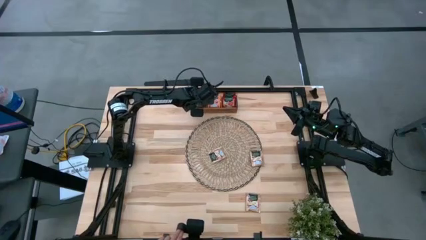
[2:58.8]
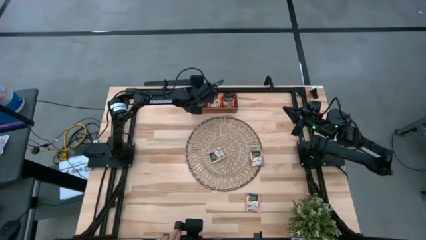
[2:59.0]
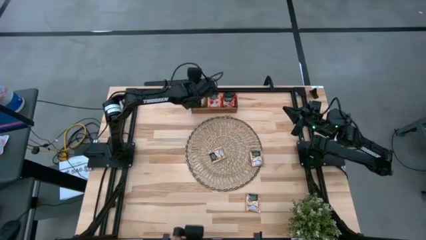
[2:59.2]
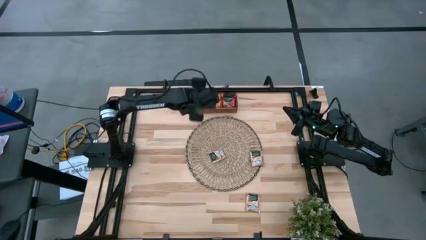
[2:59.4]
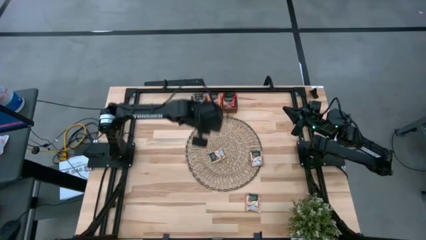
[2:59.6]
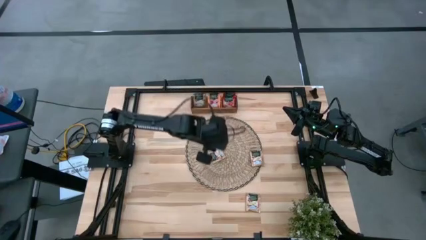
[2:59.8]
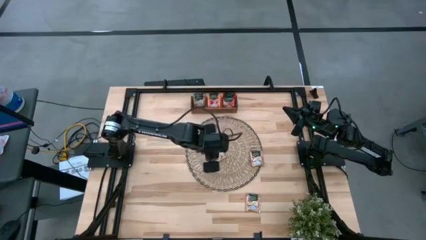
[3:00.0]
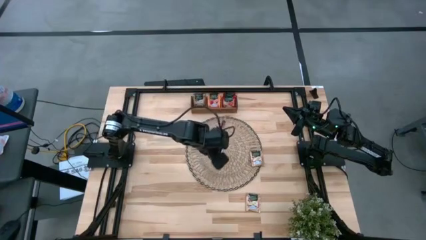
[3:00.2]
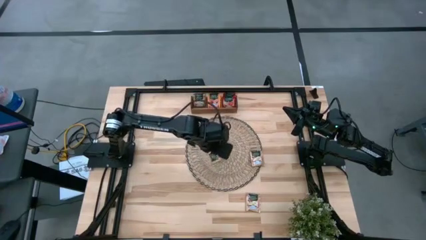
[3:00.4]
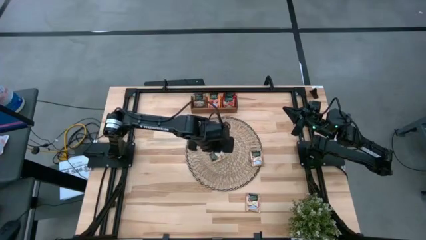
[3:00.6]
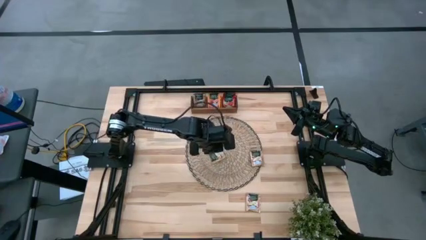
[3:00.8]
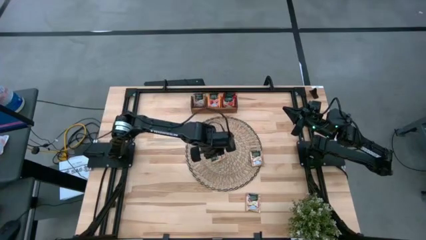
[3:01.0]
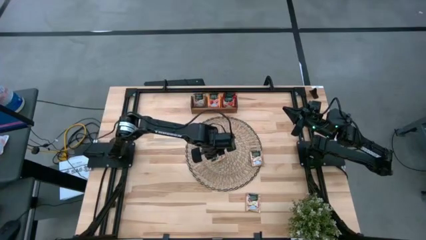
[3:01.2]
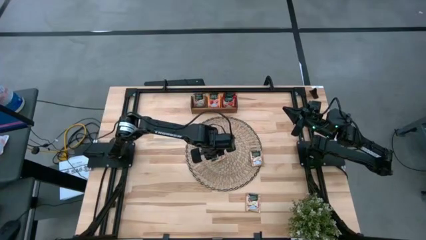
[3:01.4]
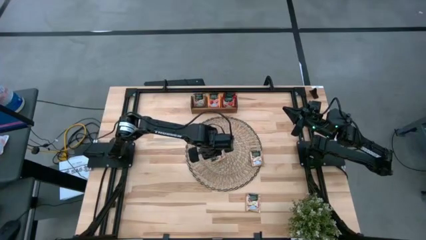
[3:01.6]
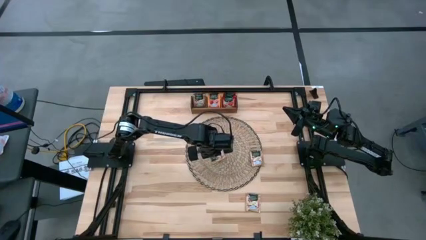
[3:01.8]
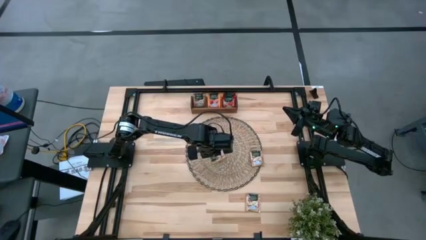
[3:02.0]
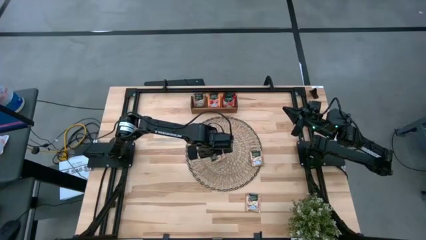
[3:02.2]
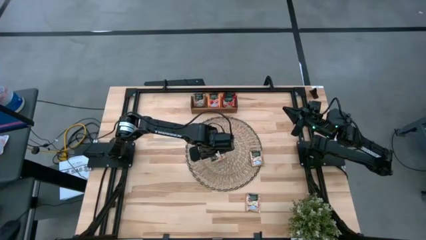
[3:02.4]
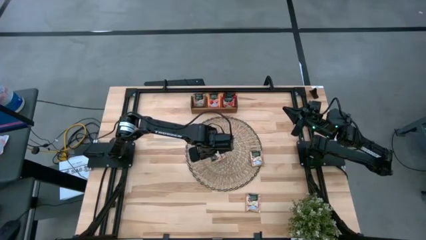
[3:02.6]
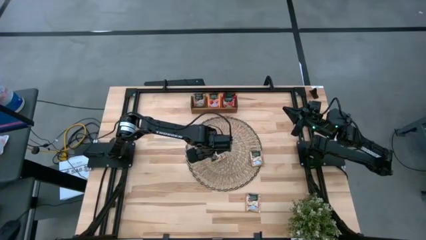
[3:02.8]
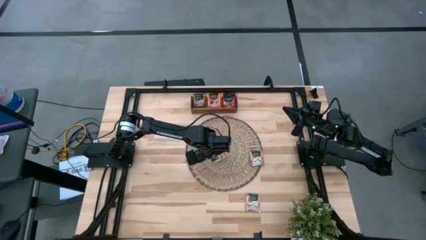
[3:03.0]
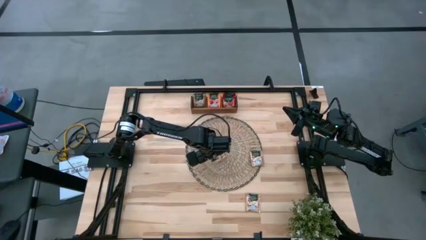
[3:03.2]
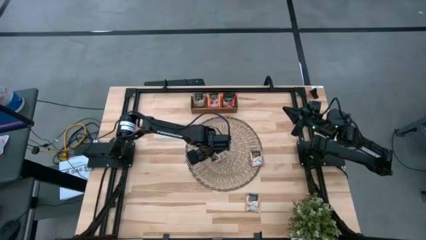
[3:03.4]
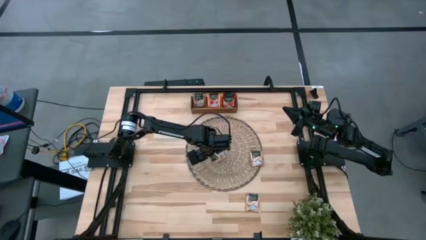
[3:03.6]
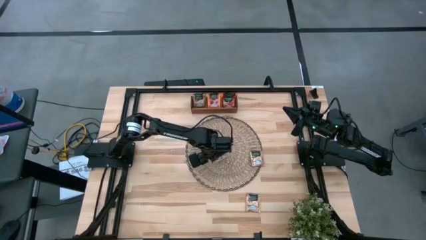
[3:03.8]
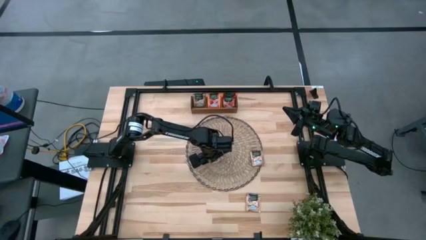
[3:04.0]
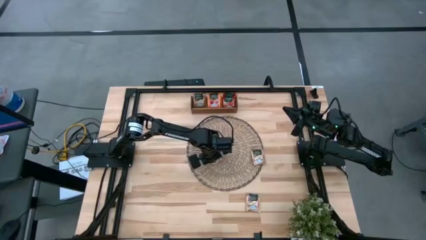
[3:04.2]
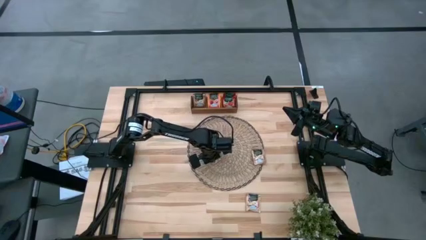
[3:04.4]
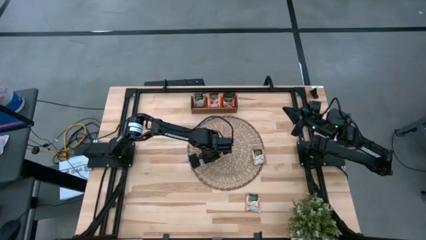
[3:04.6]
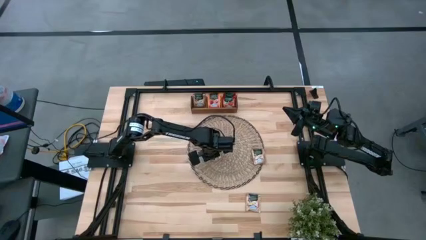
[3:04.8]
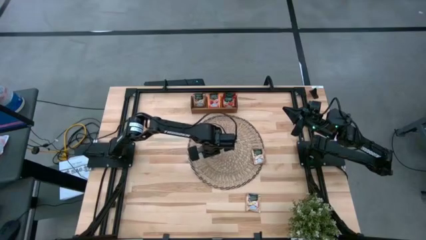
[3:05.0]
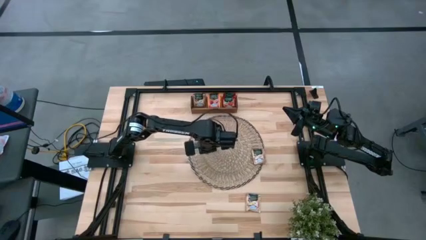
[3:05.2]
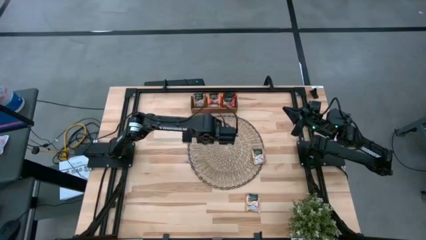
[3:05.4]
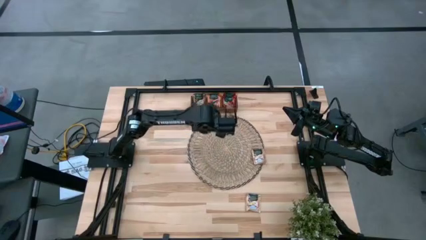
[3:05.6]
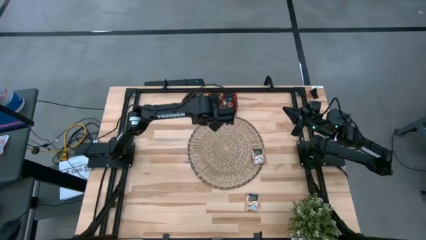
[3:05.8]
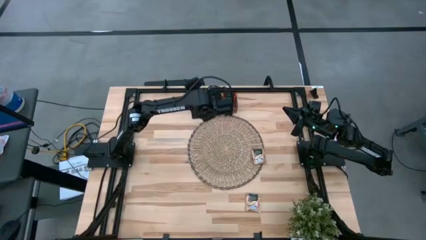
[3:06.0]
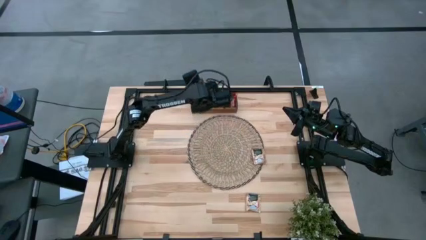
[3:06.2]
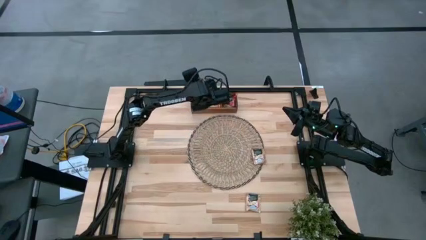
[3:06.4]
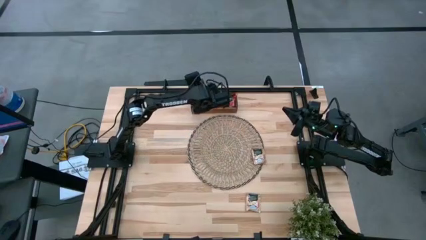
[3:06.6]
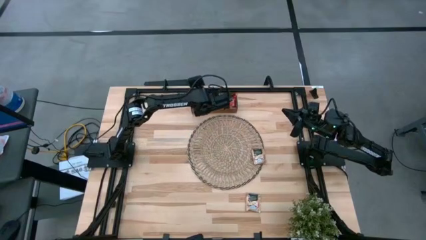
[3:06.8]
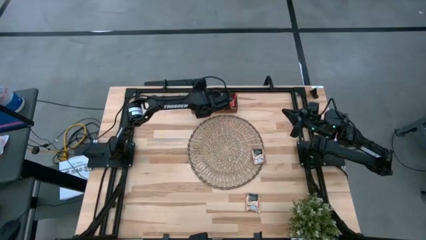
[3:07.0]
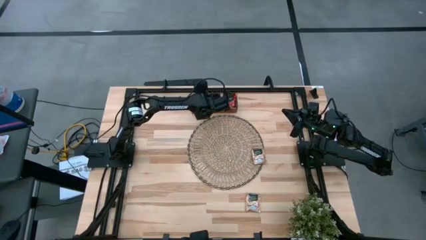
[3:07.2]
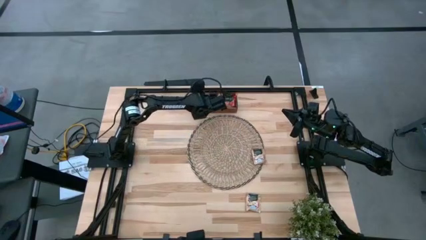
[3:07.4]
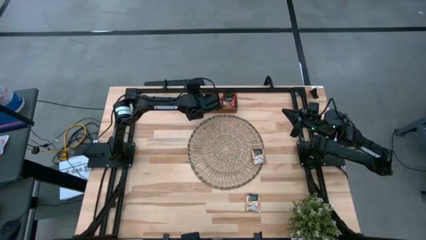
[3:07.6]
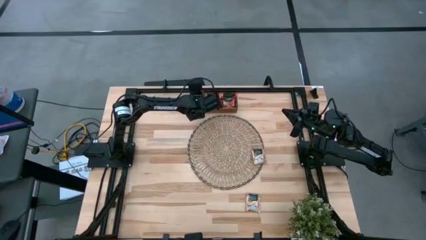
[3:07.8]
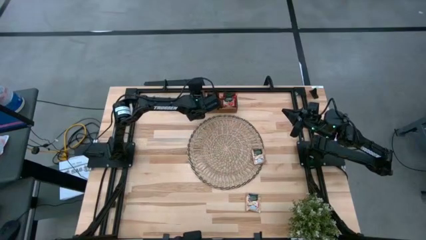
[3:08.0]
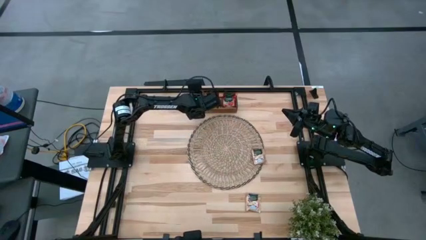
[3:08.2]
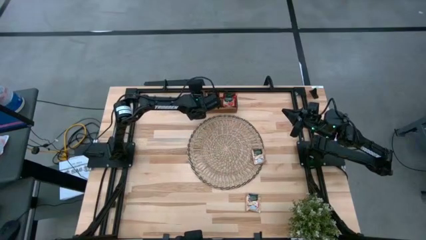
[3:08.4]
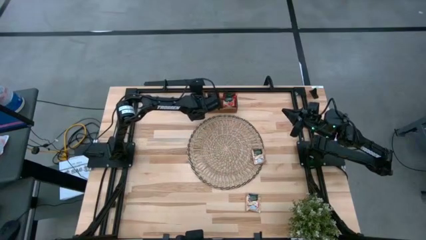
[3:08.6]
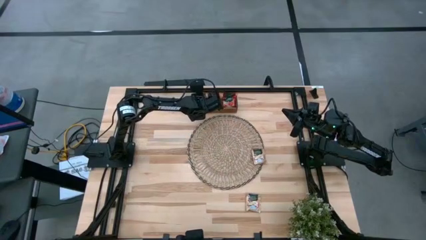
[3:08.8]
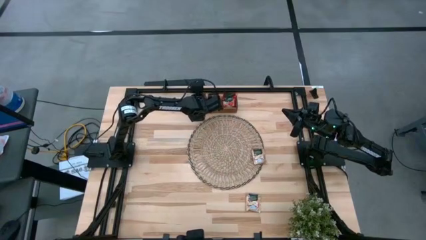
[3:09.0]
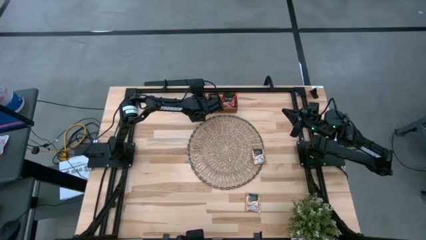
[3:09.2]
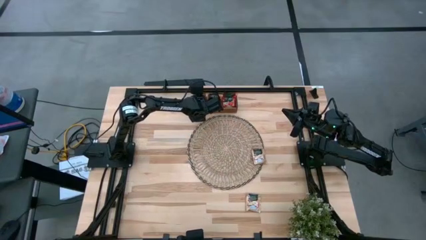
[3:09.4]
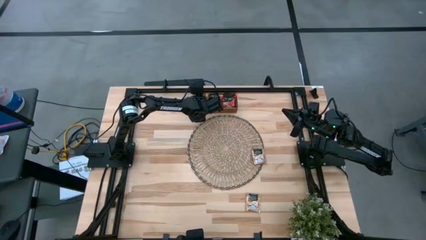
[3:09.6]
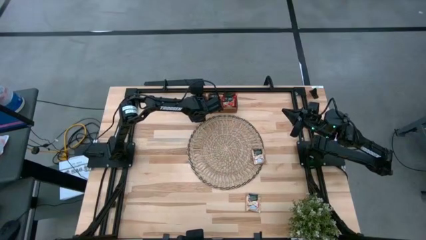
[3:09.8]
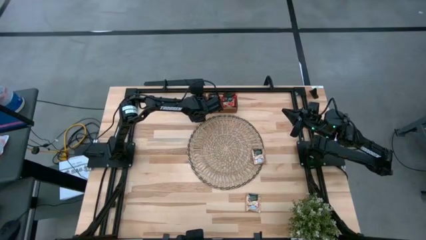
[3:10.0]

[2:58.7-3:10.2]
Task: Pick & Place Tea
Put the brown tea bag into the left section of the wooden organizer

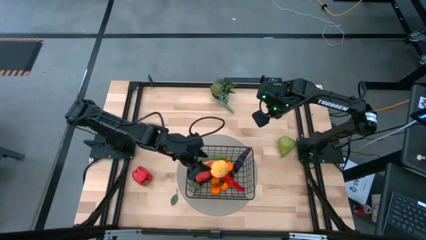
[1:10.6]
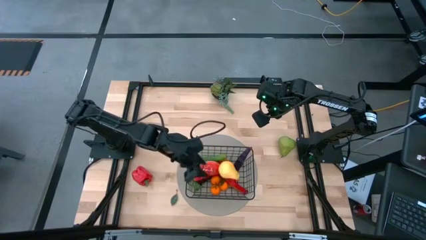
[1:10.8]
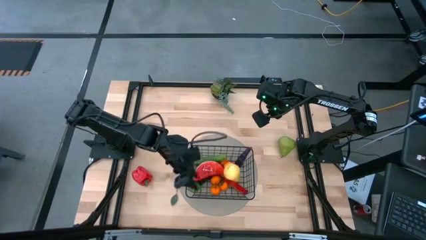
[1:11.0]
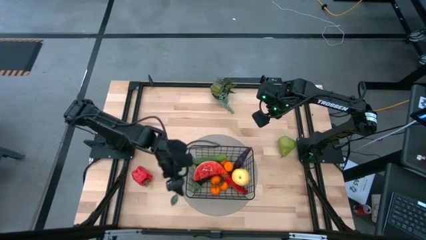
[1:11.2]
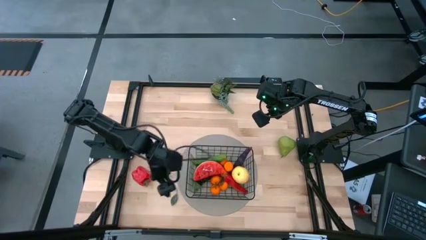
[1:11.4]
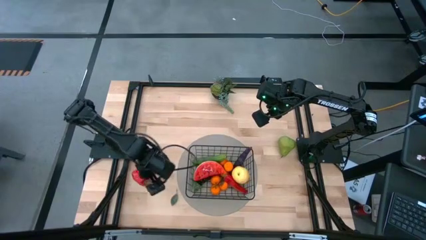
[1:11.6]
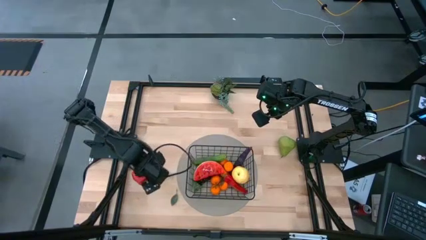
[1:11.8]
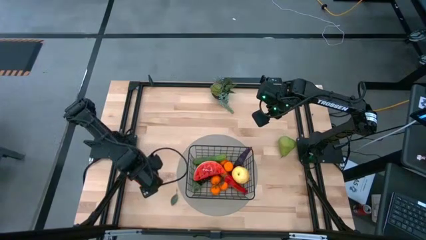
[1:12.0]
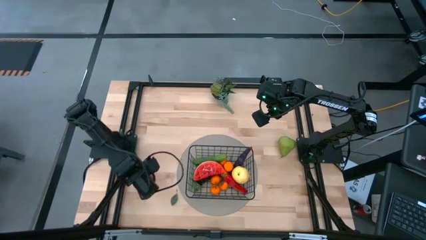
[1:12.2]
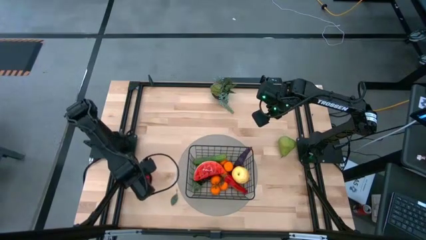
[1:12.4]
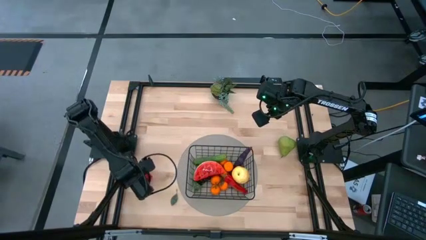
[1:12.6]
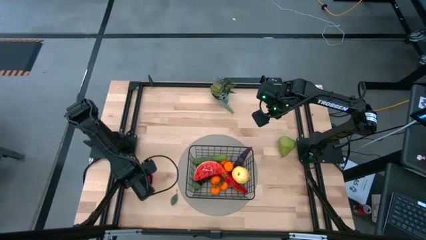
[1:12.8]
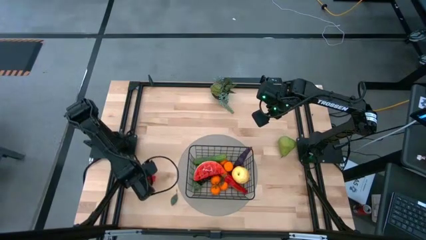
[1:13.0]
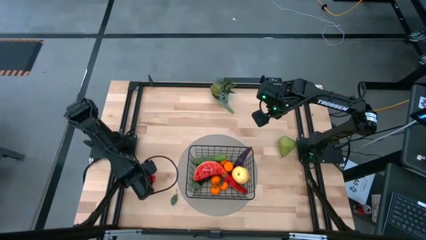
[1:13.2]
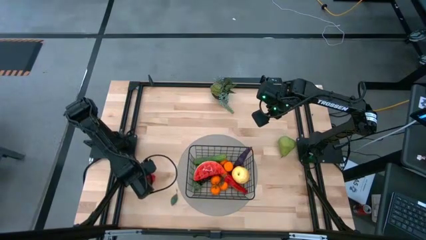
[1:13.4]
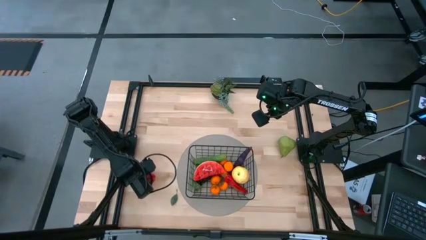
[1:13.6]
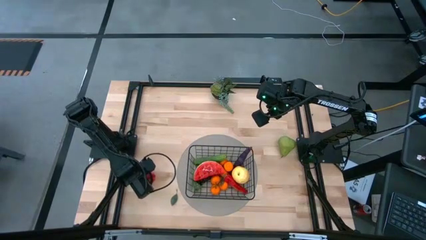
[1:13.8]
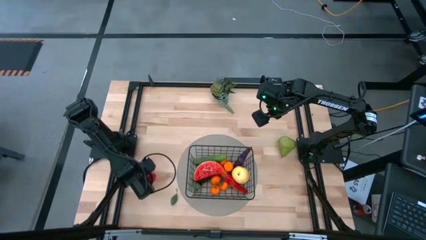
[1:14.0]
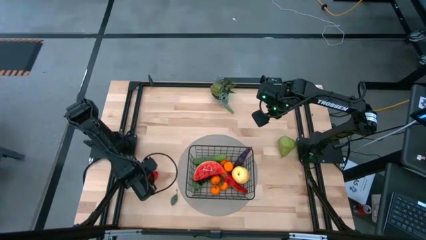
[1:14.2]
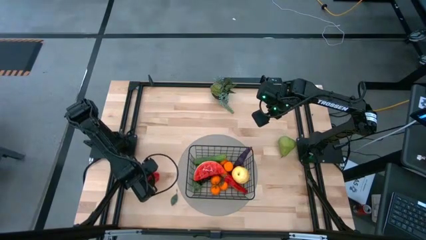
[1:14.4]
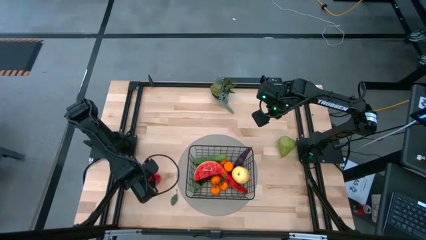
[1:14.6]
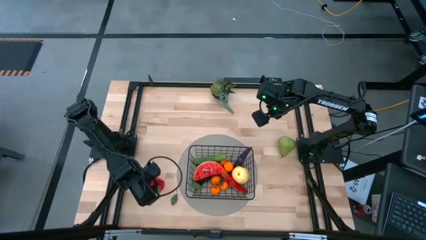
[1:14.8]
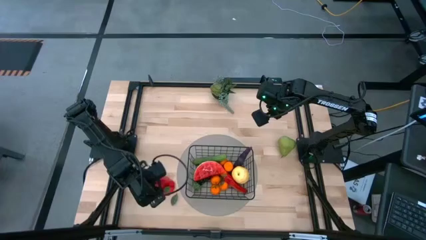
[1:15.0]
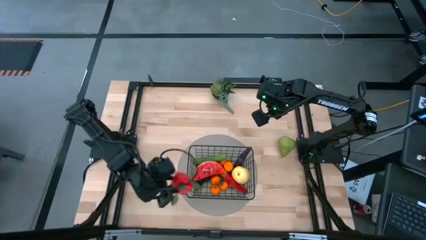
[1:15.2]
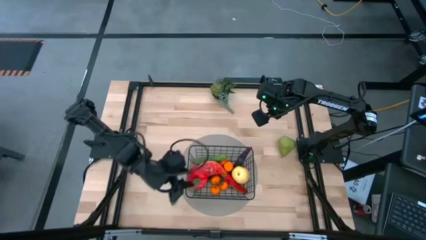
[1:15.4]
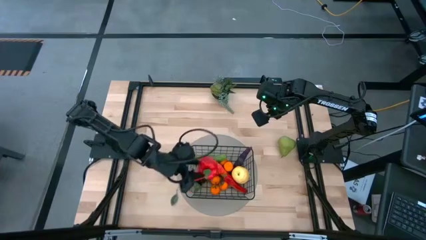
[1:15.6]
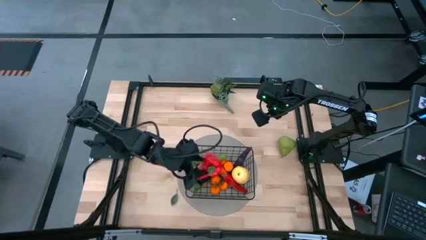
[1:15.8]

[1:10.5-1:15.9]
Task: Build produce basket
Put the red bell pepper into the black wire basket
